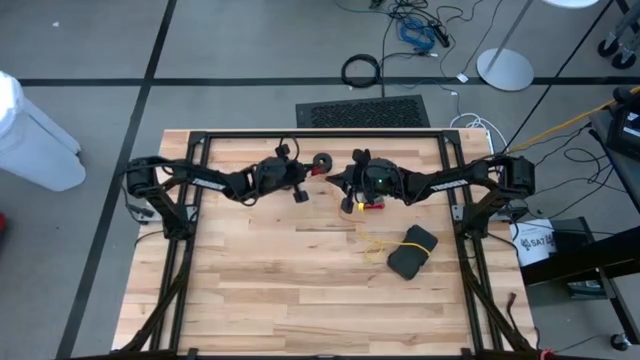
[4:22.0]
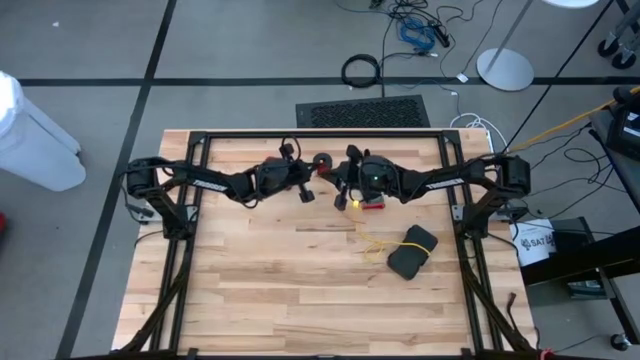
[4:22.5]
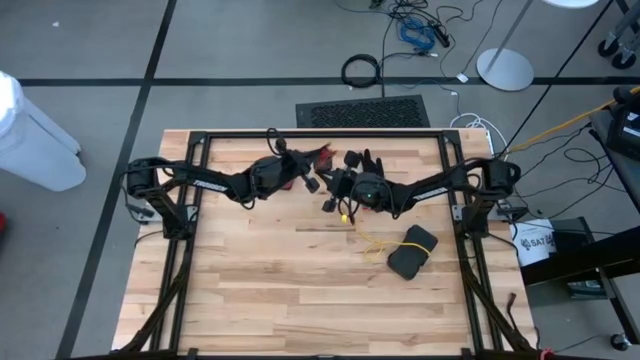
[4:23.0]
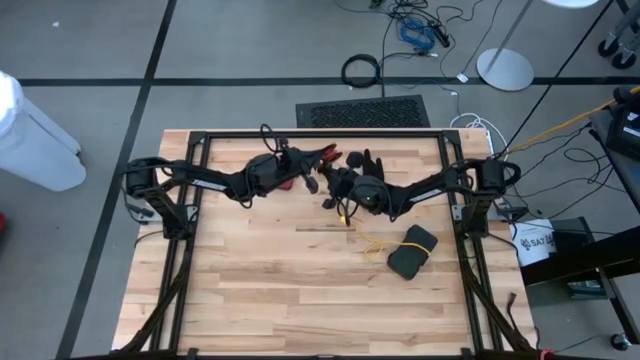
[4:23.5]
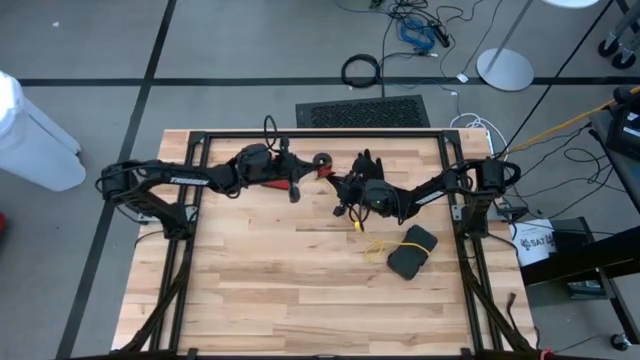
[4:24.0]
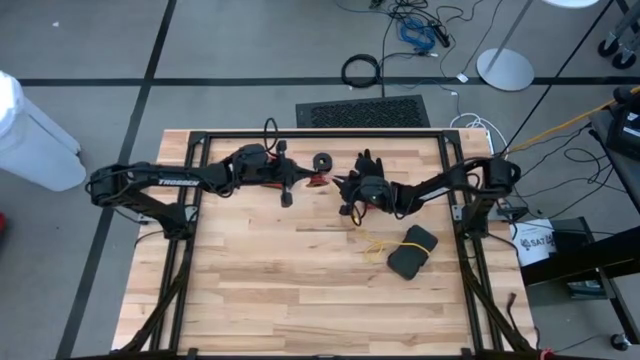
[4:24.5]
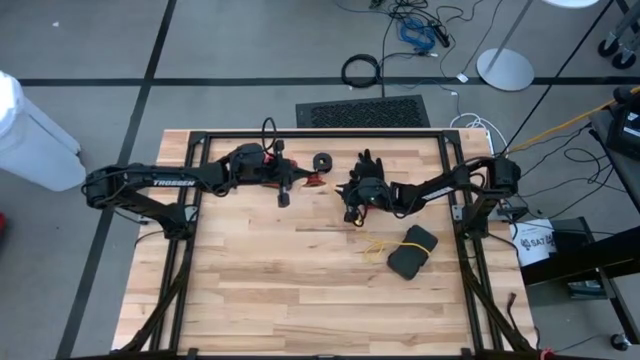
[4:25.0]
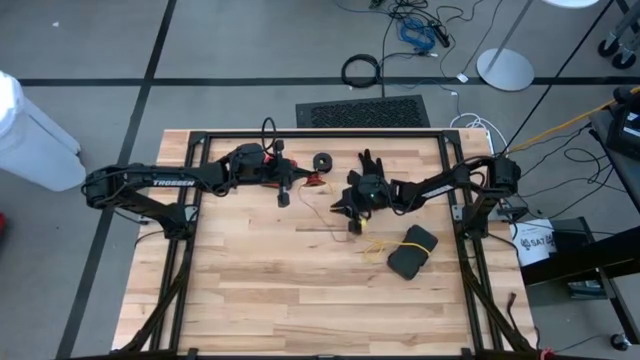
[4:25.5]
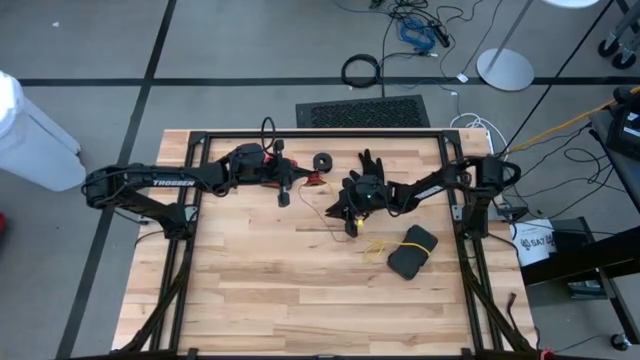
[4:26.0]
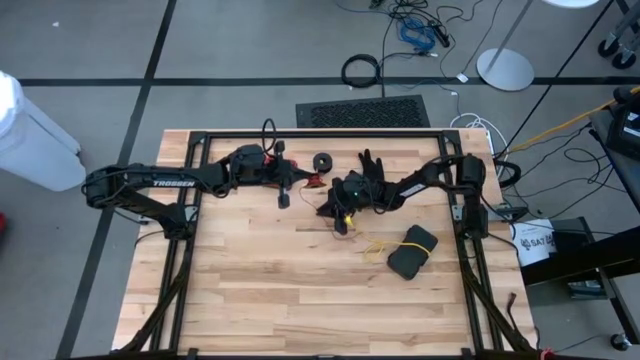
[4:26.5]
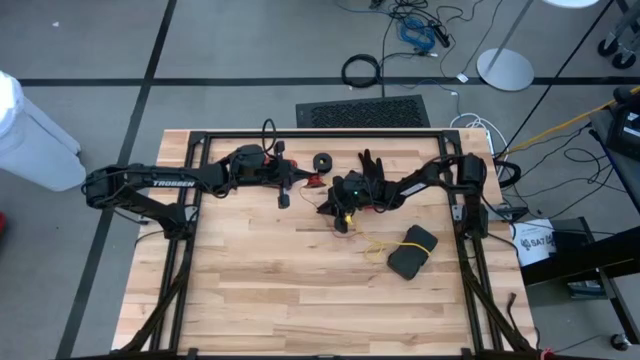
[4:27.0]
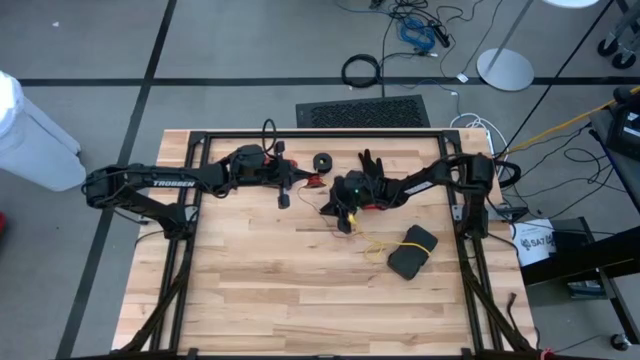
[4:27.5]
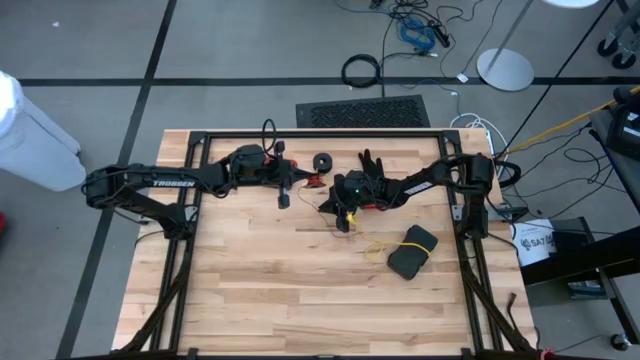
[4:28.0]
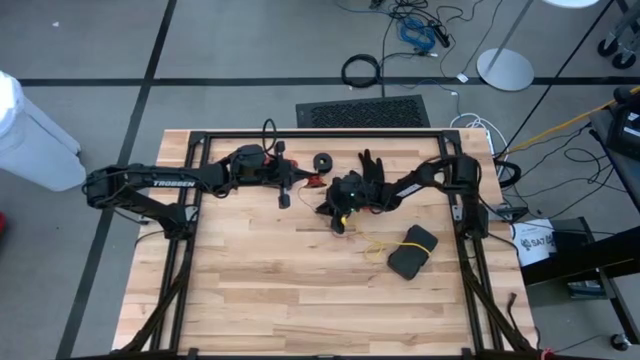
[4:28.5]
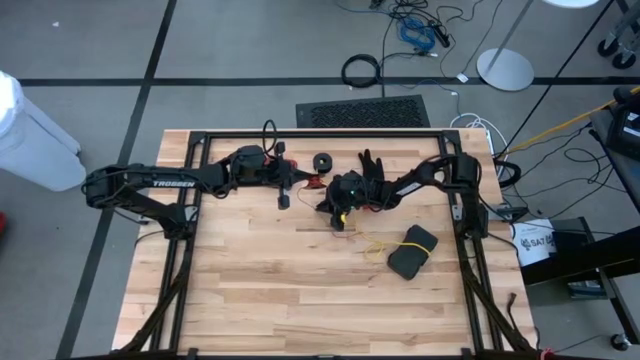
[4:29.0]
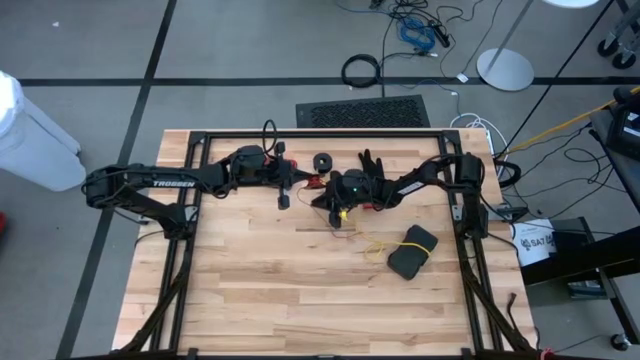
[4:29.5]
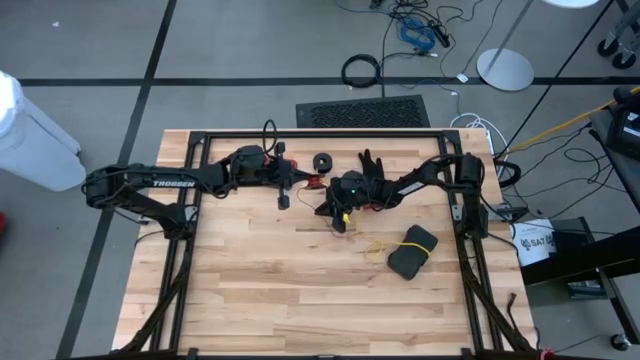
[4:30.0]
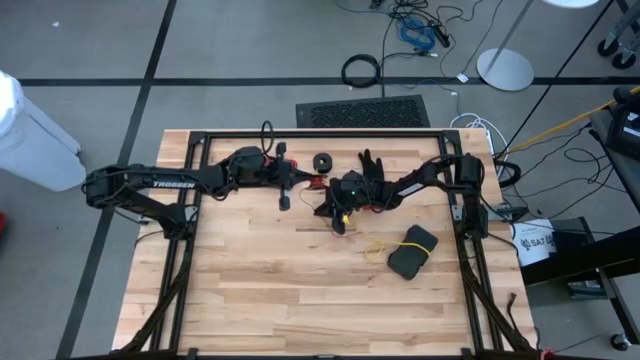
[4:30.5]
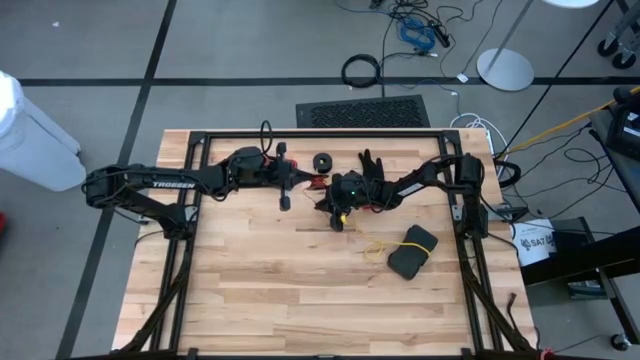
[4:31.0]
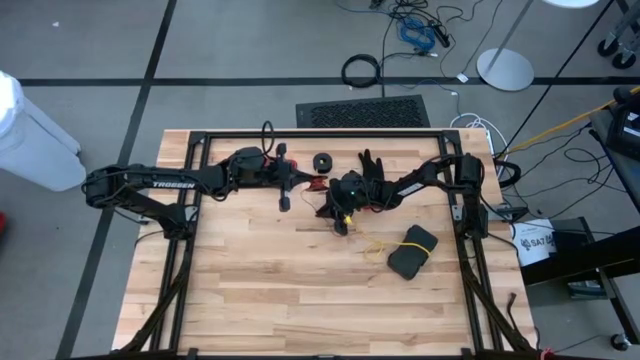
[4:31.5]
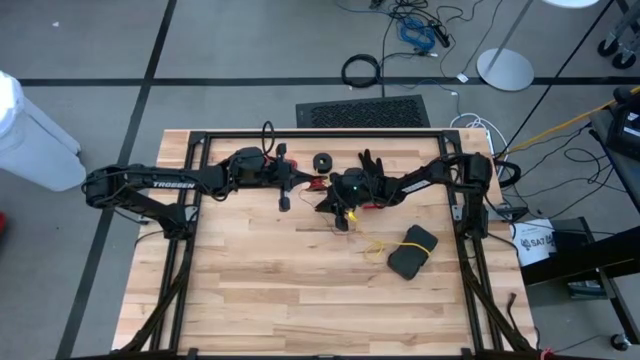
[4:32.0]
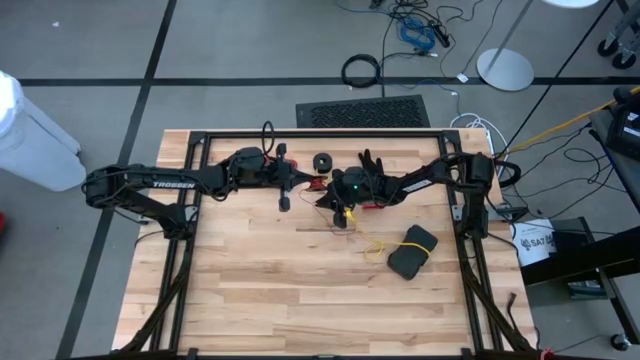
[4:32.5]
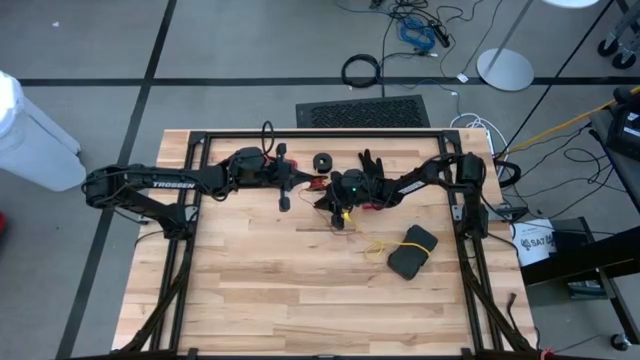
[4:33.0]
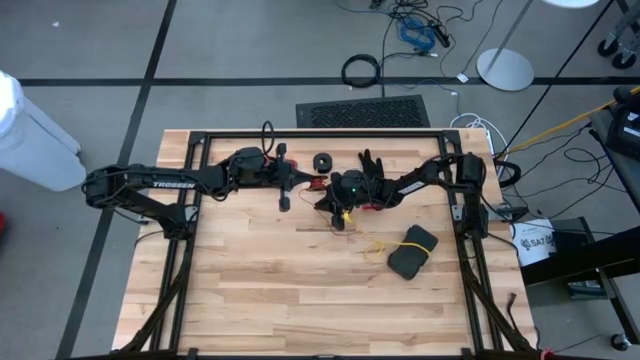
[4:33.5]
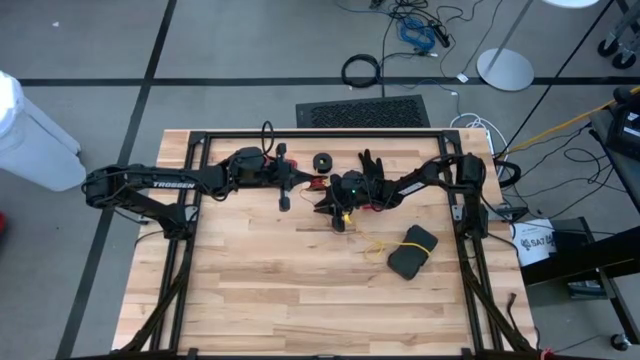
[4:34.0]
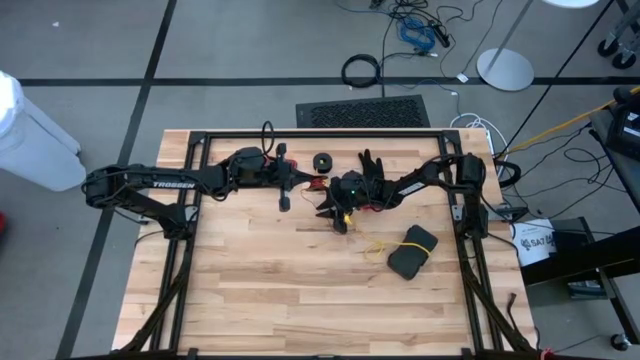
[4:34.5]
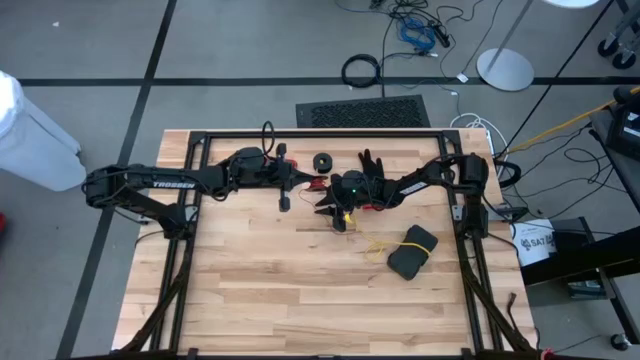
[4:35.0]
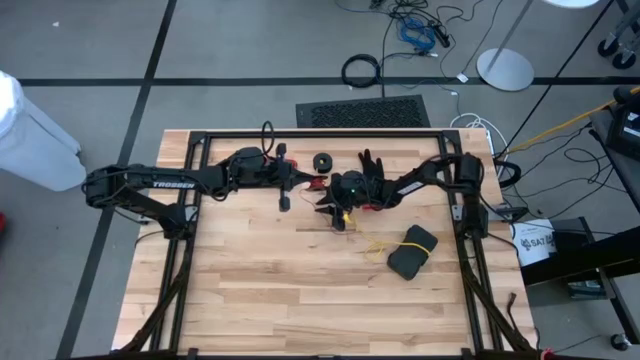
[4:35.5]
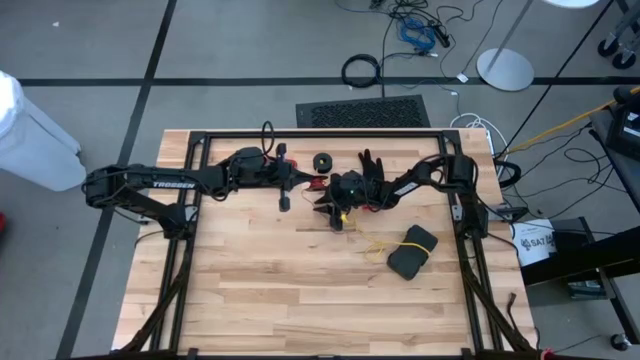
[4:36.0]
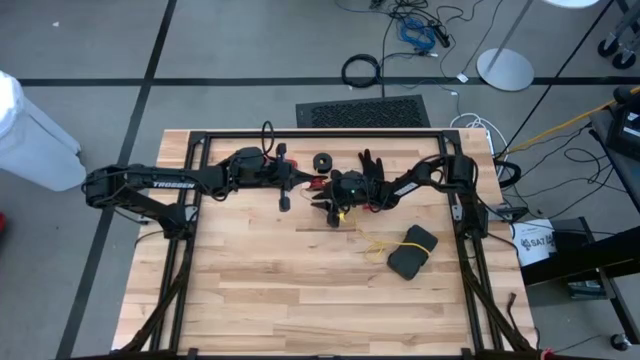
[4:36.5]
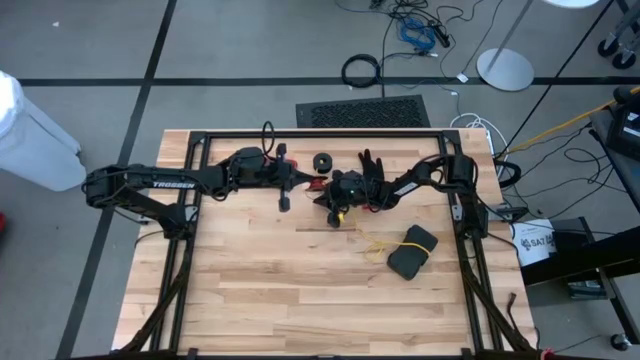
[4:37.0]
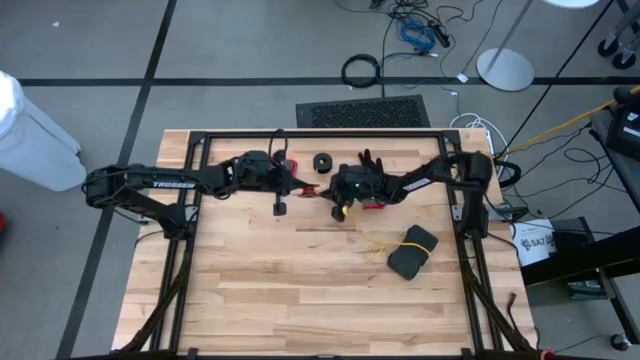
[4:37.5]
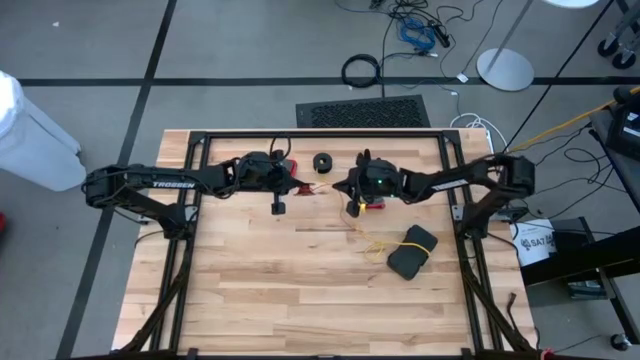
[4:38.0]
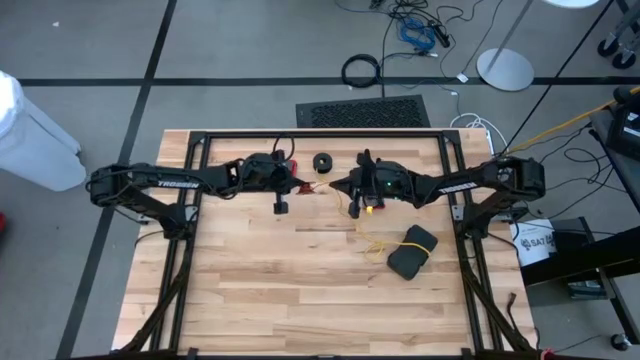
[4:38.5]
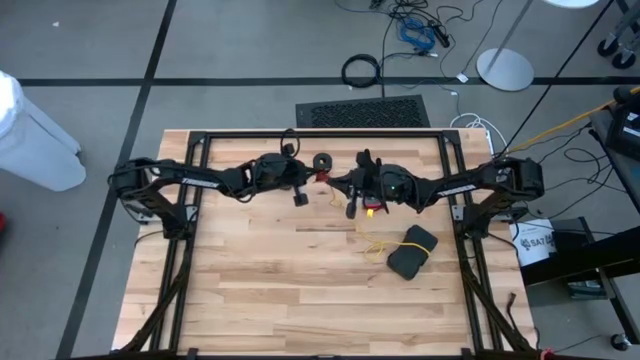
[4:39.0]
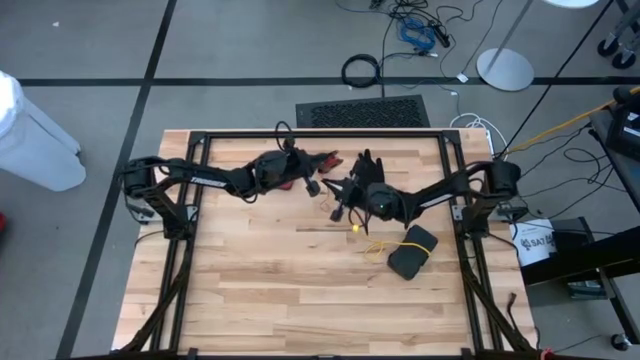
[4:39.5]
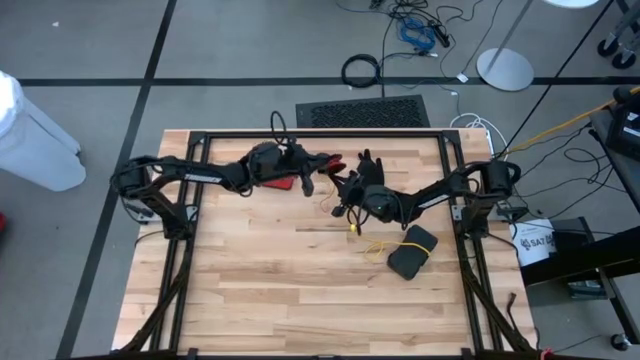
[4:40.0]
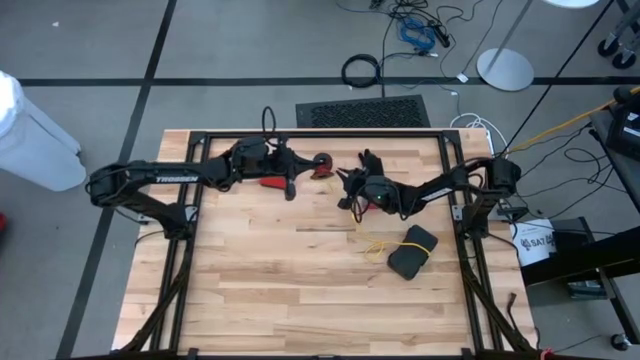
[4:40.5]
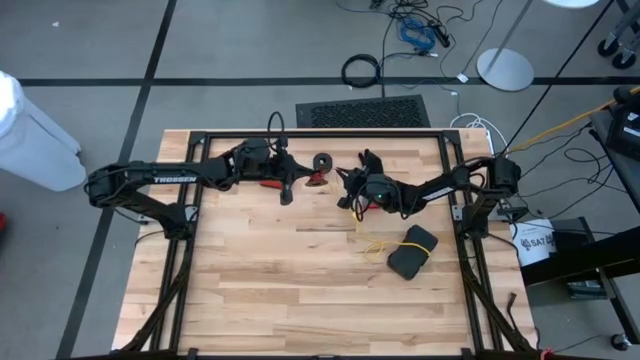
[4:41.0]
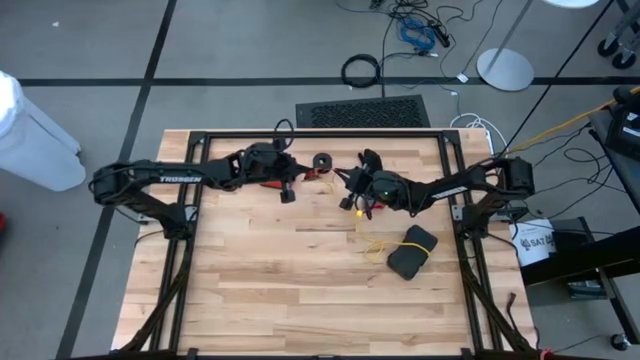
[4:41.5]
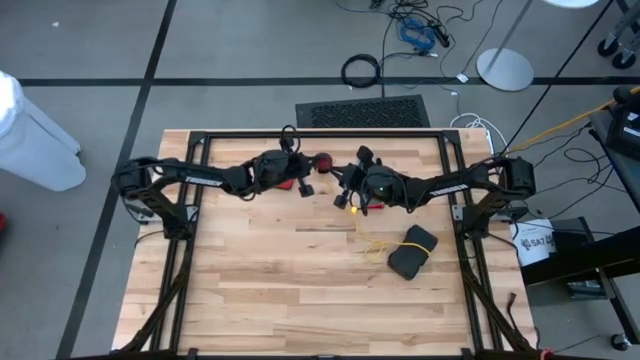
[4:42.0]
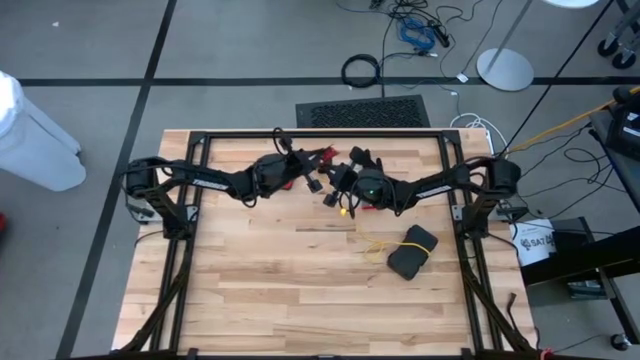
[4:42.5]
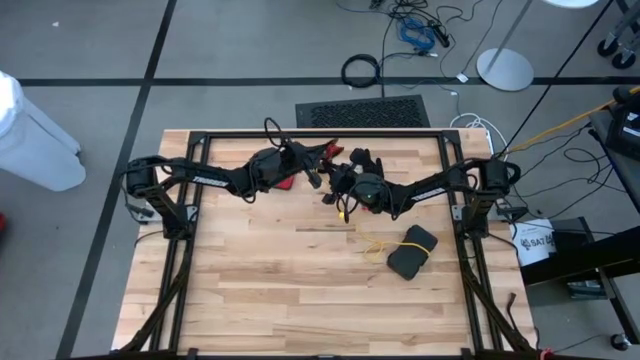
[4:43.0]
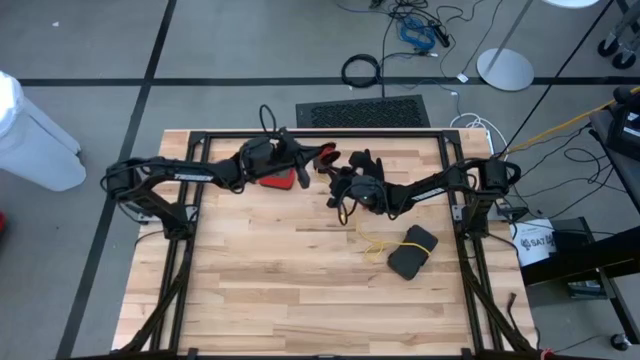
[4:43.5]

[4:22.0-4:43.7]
Task: Coil cords
Coil the red wire onto spool
